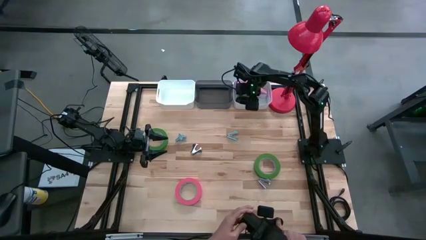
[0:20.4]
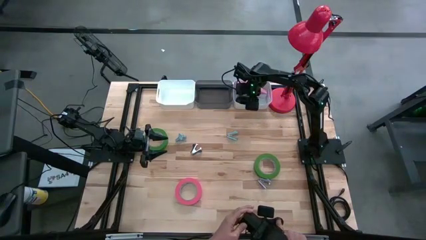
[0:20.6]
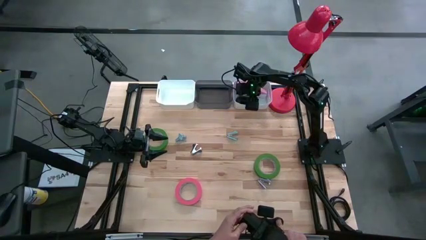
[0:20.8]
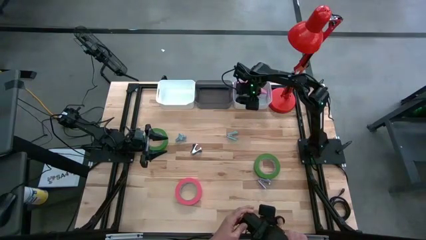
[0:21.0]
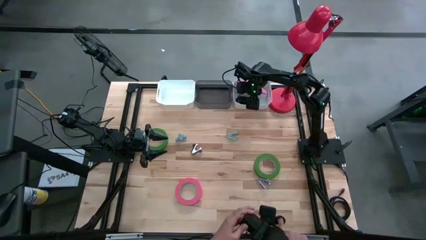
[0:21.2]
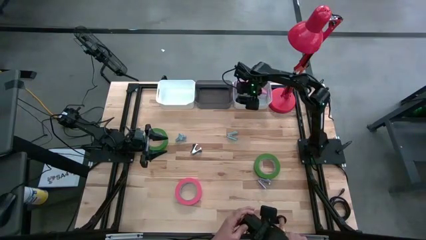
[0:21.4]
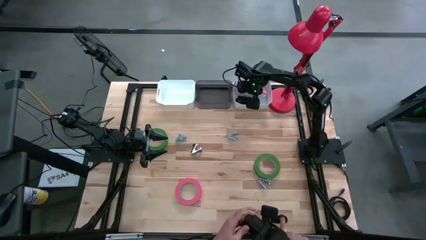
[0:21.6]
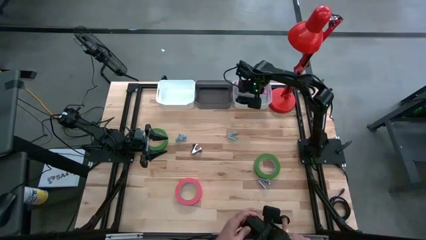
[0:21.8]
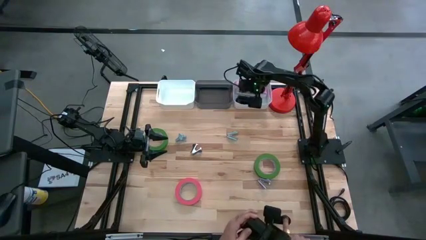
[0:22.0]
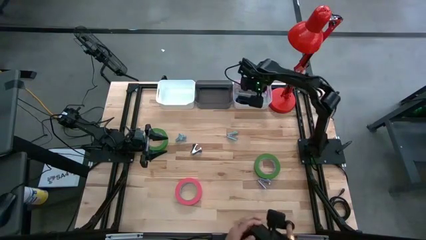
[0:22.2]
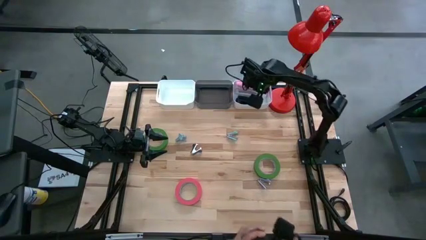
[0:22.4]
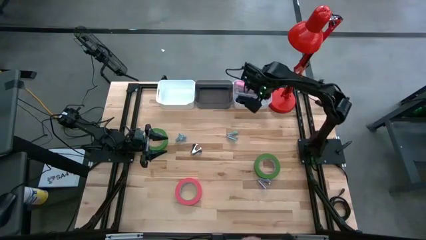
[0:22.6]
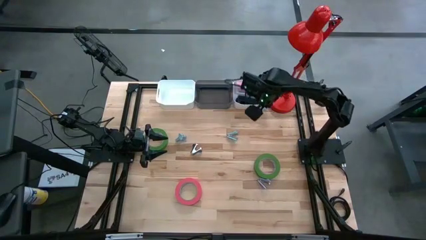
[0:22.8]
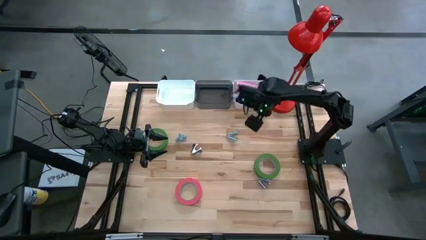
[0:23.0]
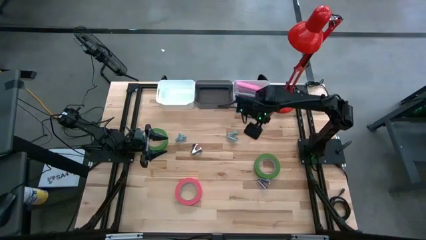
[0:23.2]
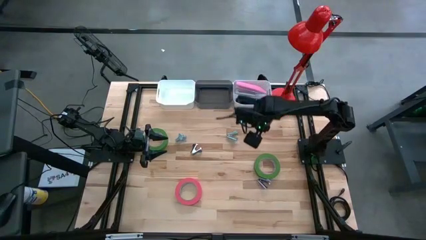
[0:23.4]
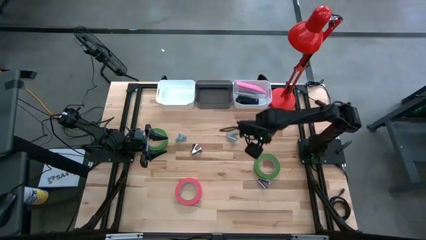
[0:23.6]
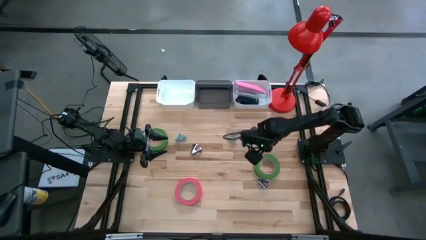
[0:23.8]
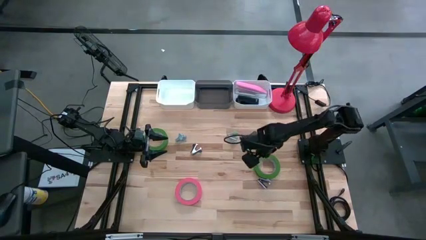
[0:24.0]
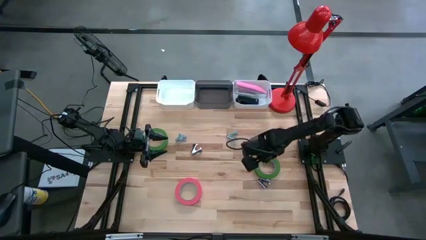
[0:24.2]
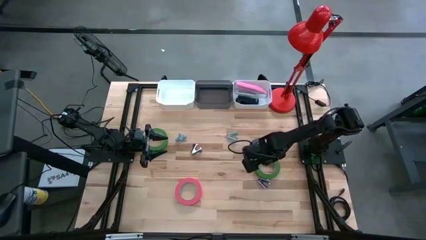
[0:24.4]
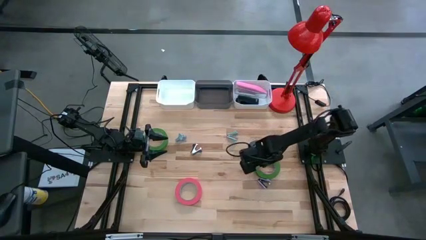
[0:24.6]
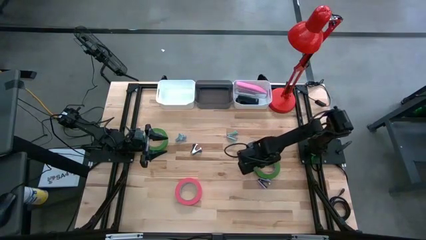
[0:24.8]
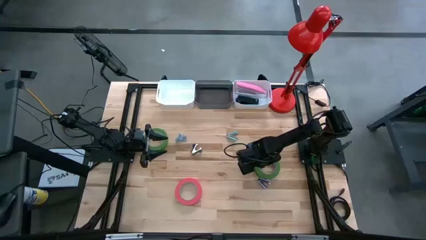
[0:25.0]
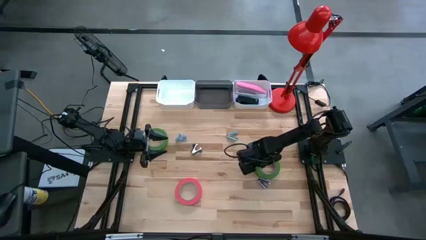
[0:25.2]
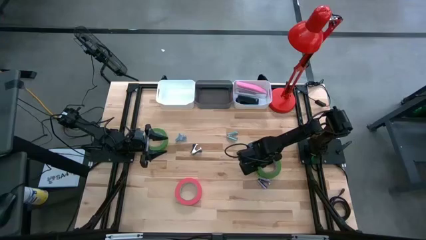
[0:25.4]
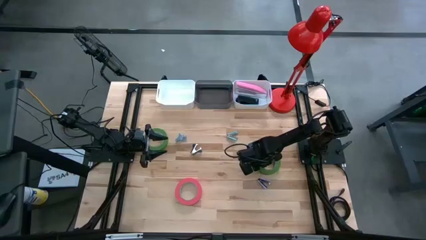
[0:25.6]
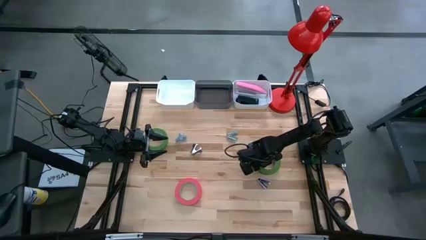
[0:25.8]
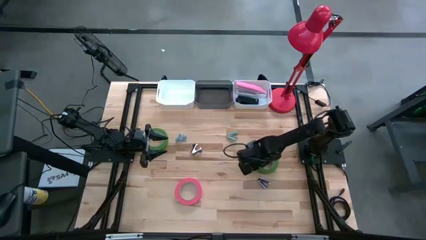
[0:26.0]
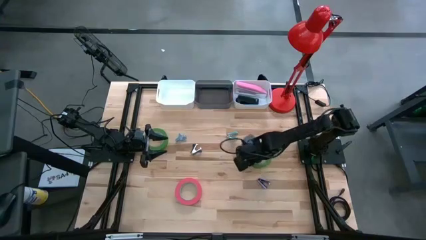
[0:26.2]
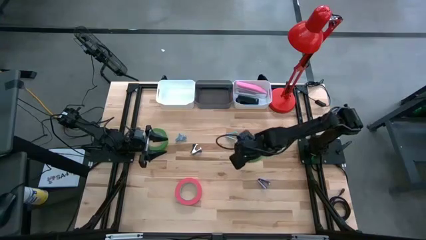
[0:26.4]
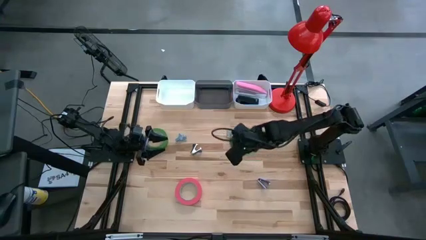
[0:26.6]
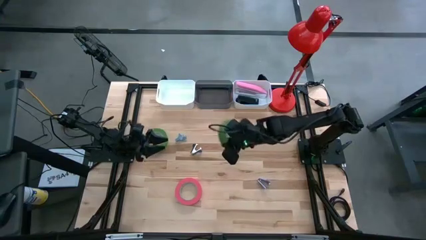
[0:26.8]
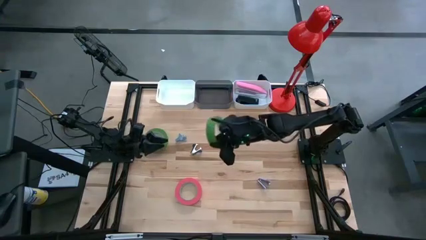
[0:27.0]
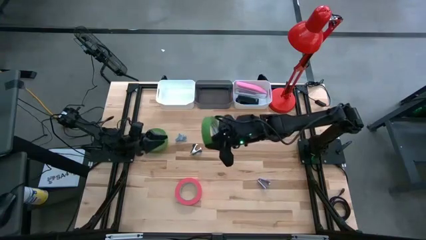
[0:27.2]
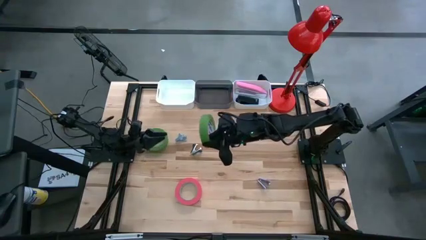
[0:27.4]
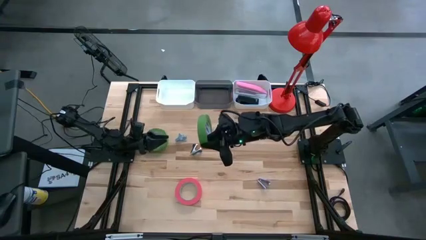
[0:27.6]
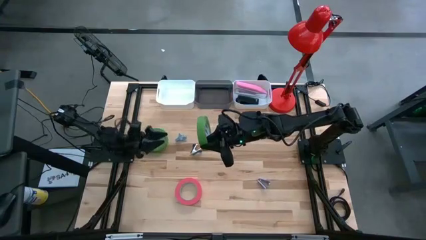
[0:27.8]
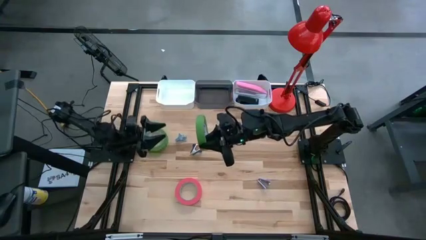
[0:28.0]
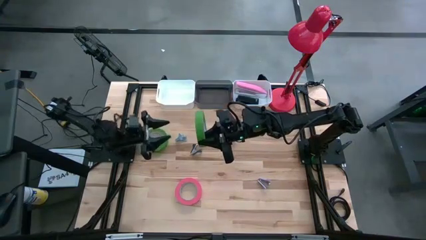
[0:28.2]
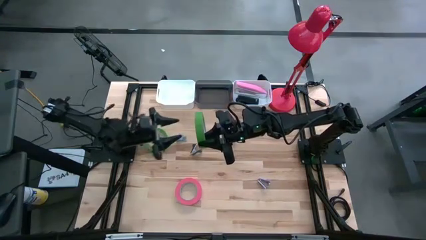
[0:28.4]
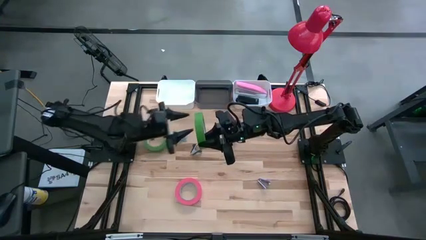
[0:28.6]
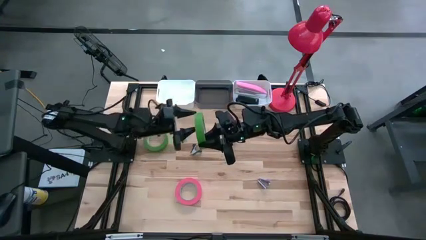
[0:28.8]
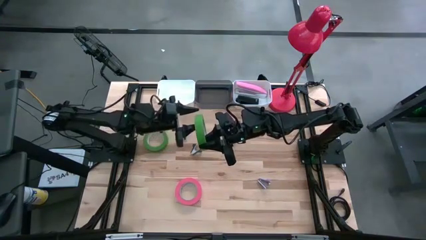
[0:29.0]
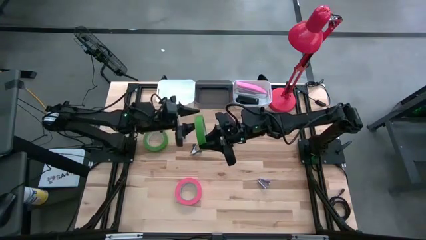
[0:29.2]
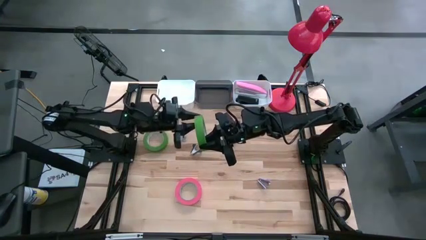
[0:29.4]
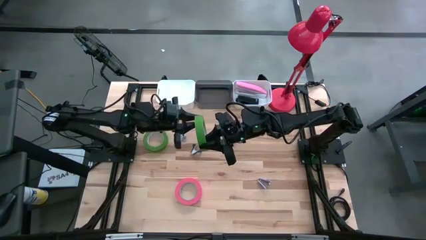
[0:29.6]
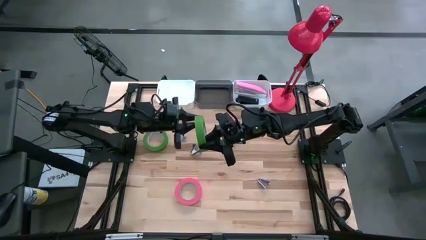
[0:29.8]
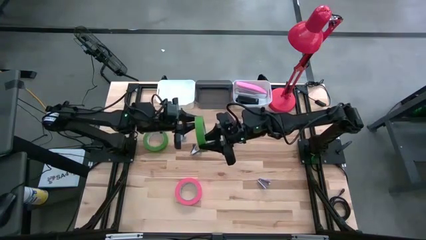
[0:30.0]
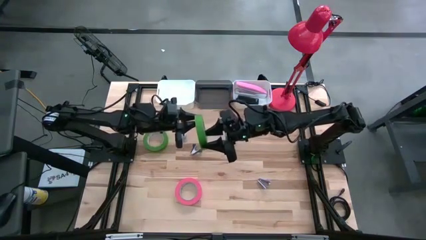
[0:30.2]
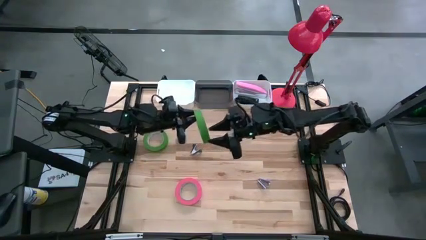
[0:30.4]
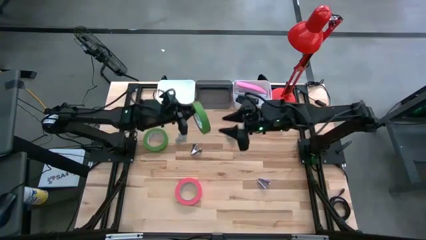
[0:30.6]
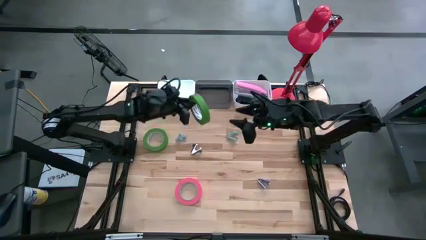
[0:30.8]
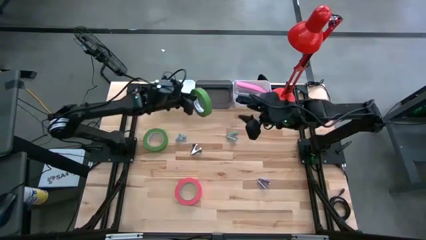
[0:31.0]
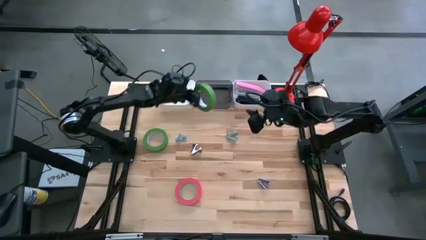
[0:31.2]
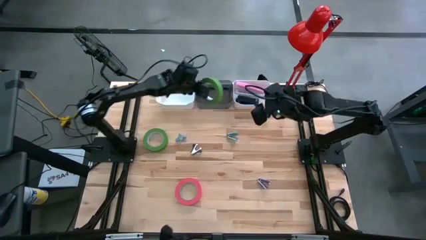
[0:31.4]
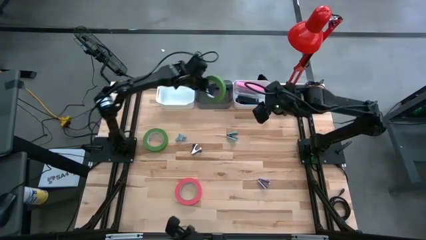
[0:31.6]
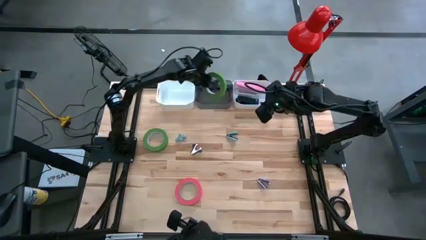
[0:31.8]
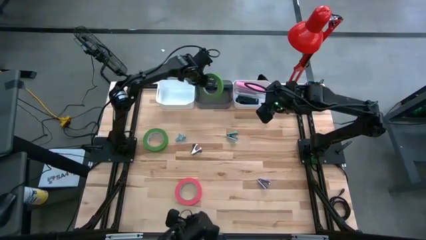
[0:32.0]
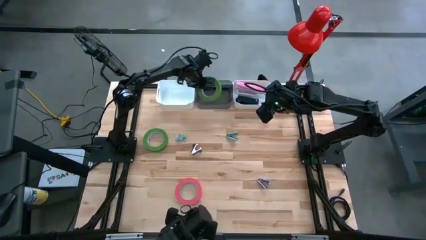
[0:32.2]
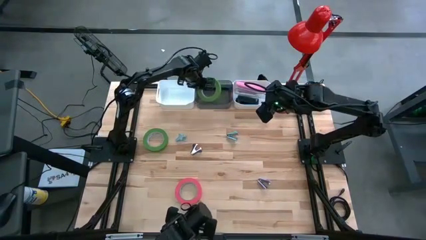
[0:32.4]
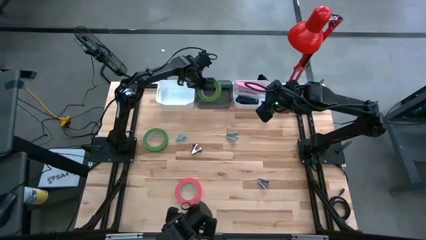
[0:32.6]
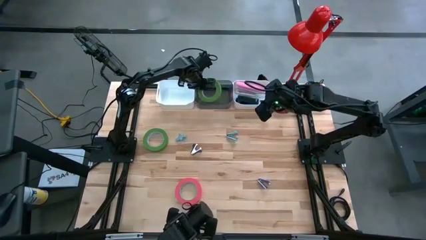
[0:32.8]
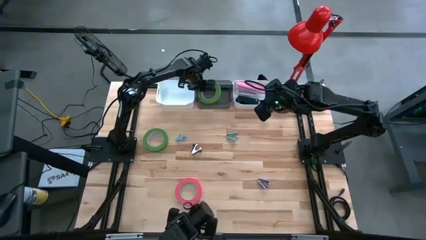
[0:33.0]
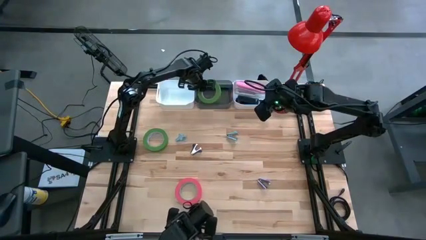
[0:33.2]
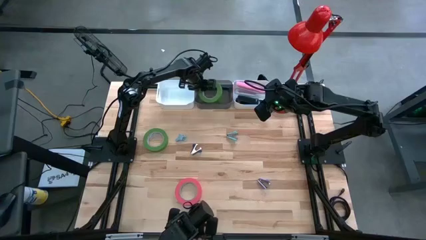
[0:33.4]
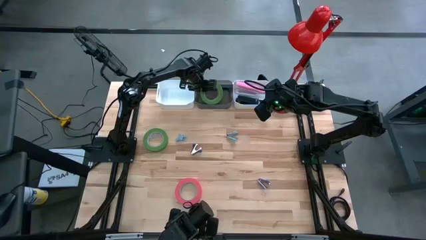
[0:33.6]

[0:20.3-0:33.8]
Task: Pick and place Stapler, Stapler remover, tape
Put the right green tape into the black bin
